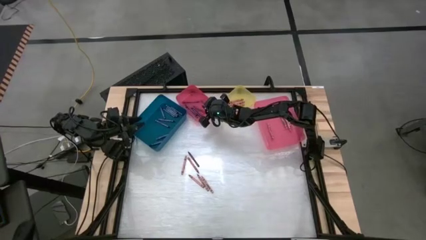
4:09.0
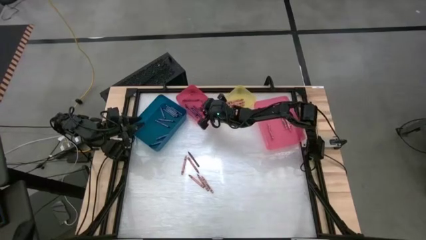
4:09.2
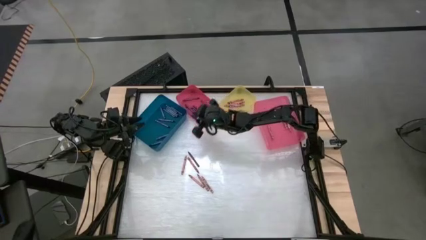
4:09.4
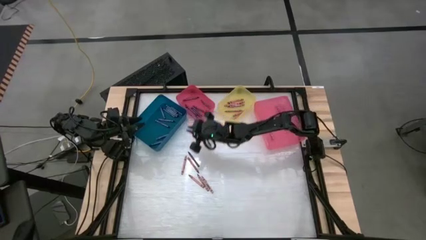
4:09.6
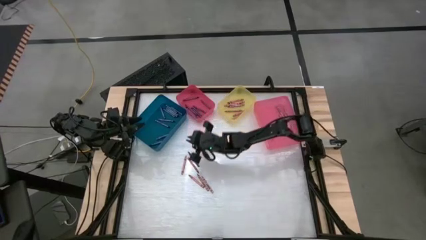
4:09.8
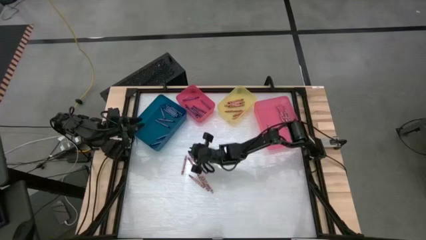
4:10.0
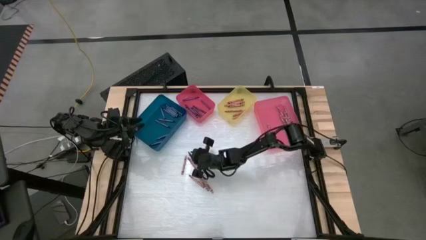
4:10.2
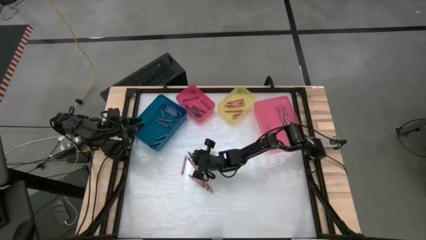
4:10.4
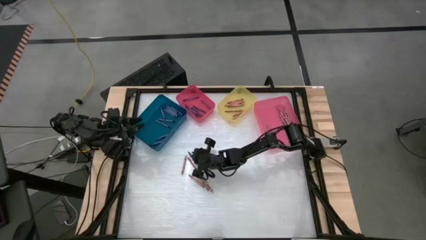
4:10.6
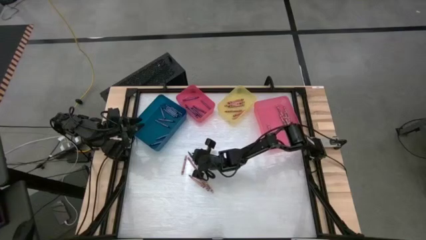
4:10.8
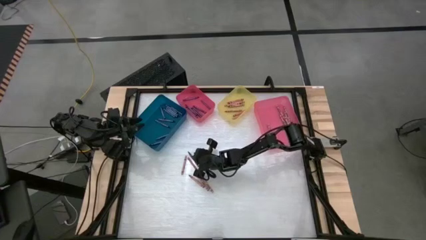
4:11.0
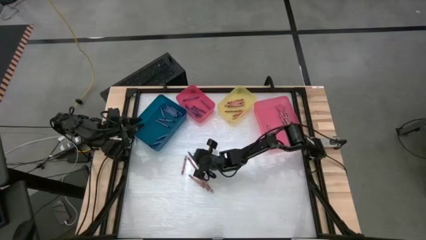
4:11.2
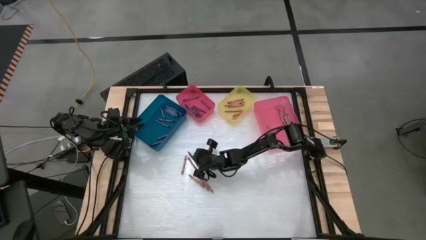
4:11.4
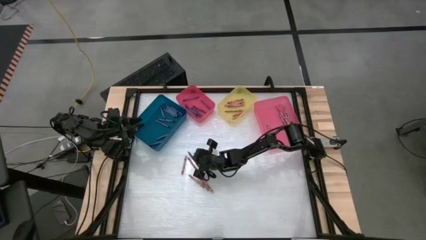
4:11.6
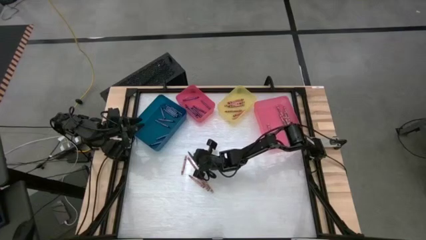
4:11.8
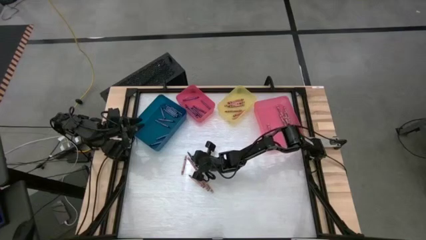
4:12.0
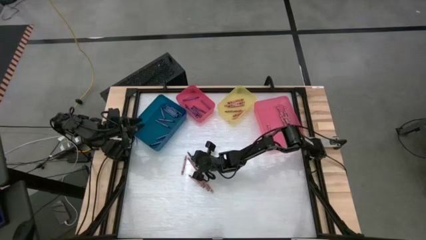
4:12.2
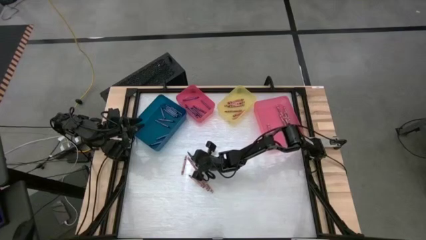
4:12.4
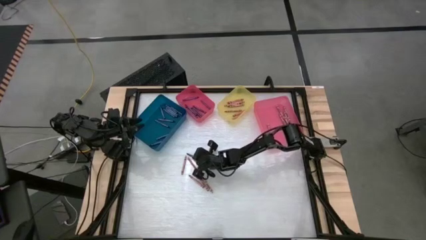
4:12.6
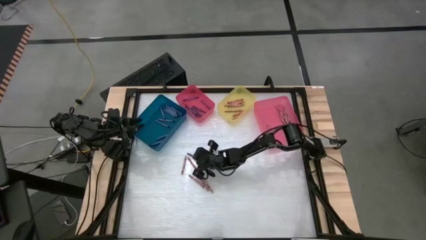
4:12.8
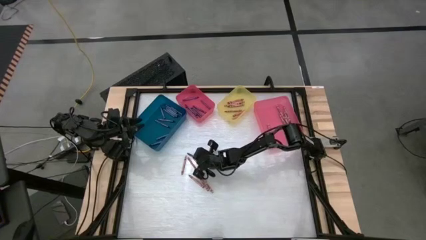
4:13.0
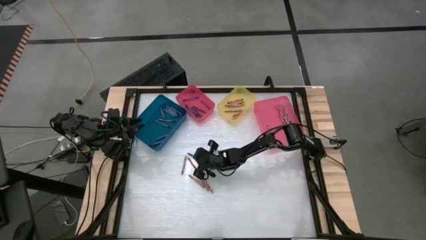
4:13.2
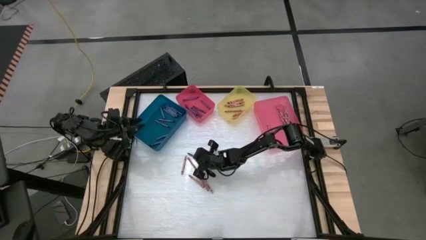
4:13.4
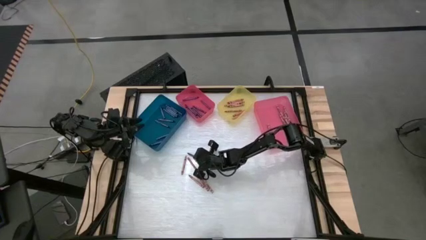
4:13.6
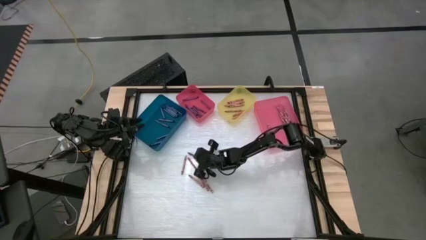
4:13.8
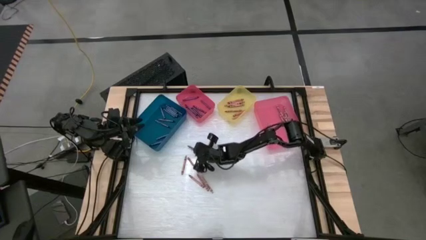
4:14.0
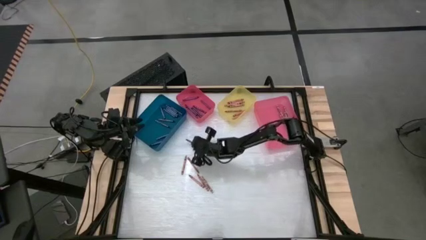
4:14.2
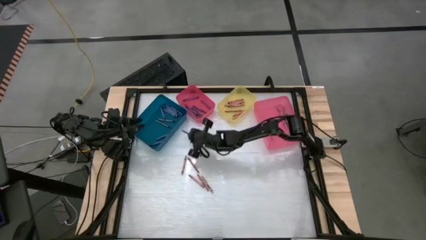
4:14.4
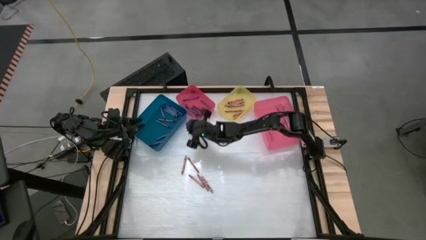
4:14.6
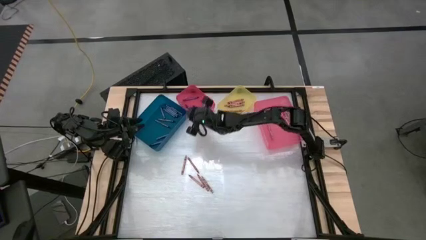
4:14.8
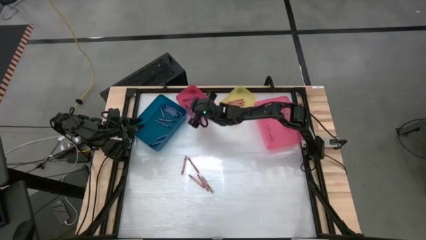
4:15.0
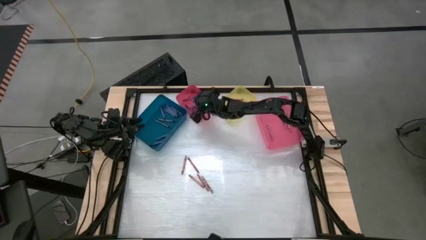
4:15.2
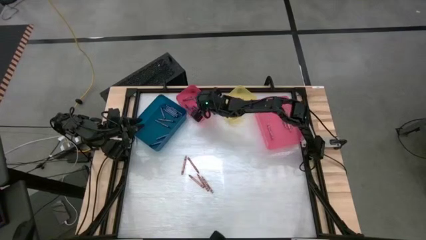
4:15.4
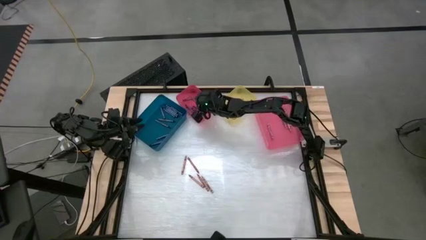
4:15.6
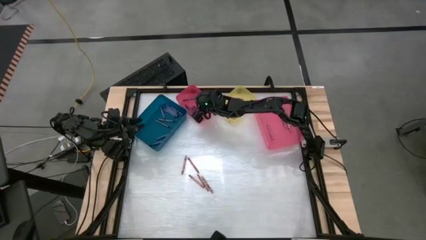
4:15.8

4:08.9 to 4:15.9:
Task: Sort crayons
Put the violet crayon into the left pink bin

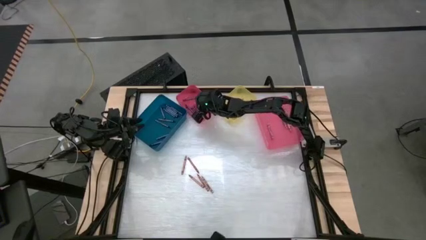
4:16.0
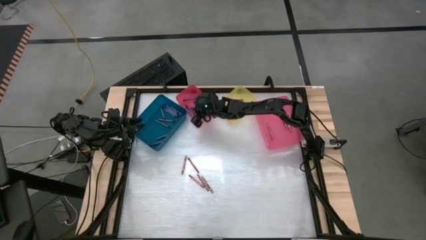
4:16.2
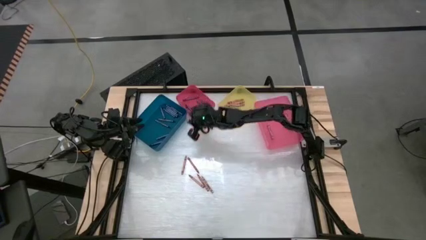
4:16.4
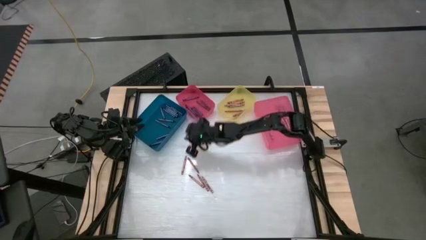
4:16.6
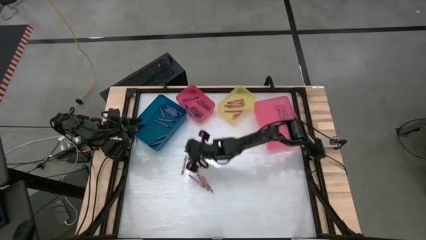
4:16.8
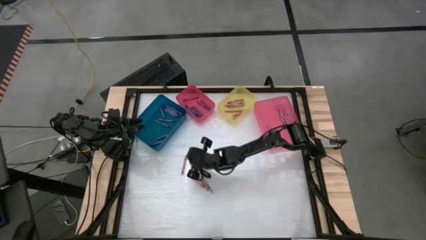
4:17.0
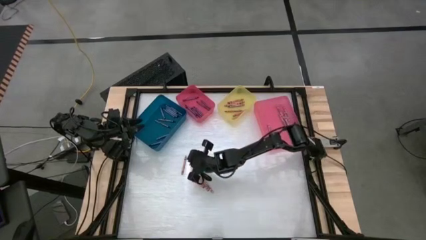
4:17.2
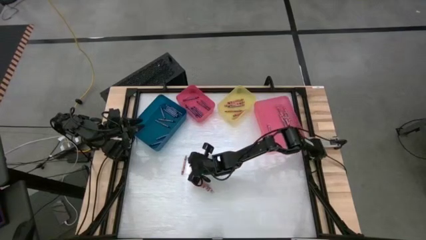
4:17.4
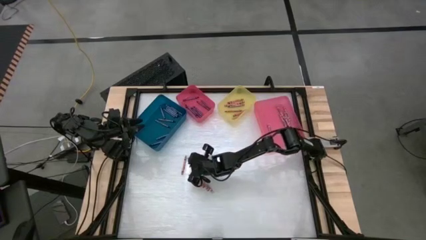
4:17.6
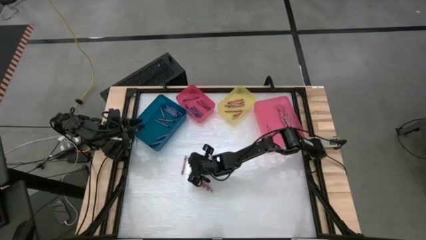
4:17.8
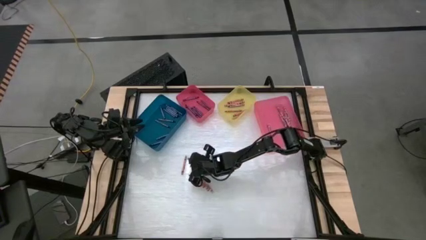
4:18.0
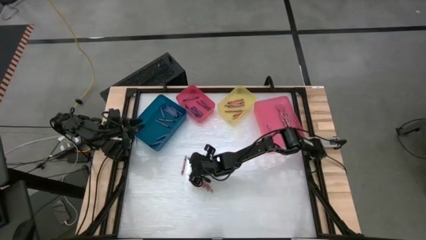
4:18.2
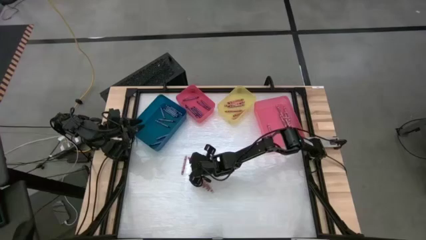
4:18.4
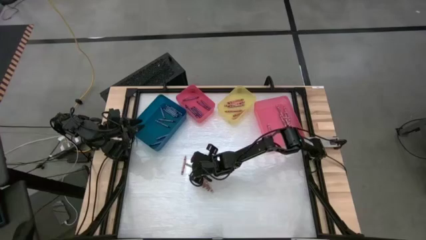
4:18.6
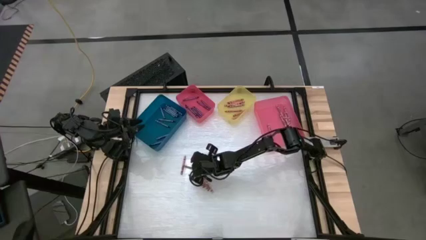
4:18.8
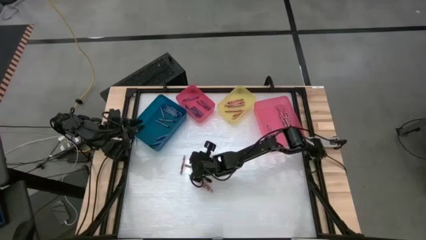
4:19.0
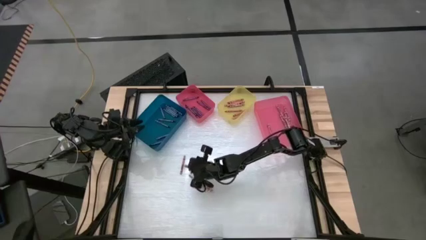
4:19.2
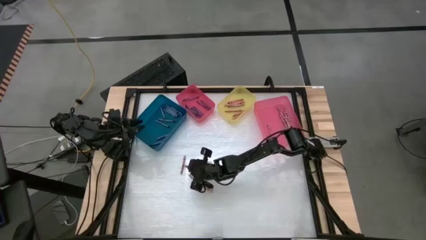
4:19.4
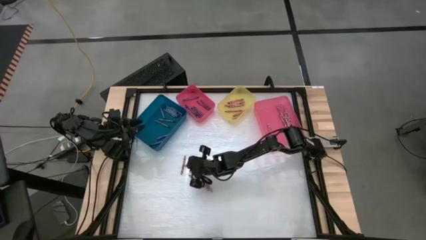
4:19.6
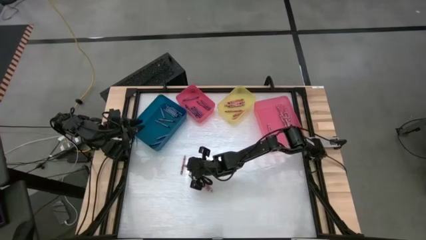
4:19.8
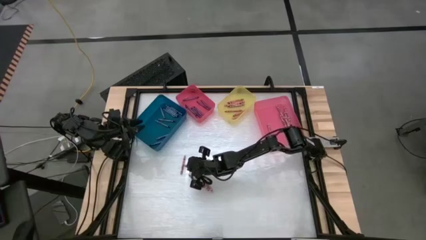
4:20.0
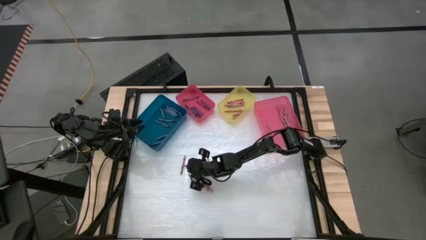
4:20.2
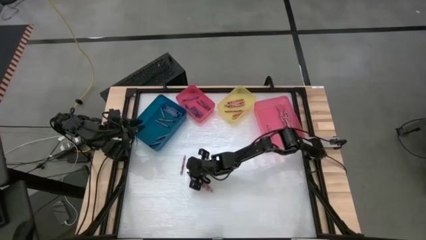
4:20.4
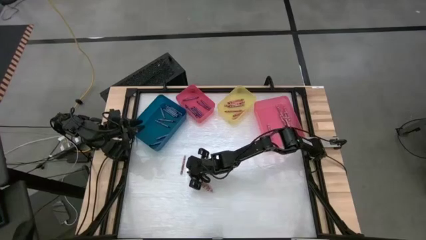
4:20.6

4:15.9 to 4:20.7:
Put the red crayon into the yellow bin

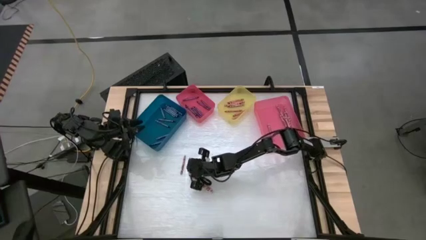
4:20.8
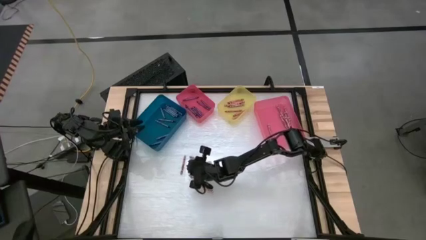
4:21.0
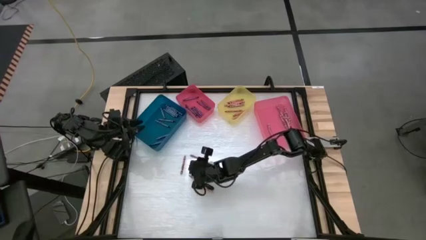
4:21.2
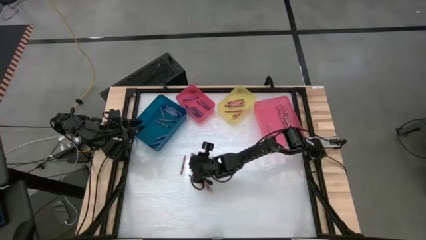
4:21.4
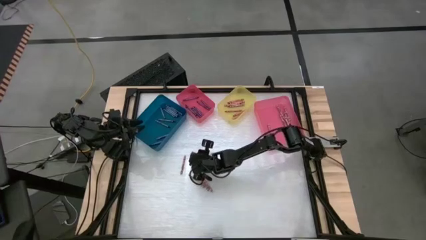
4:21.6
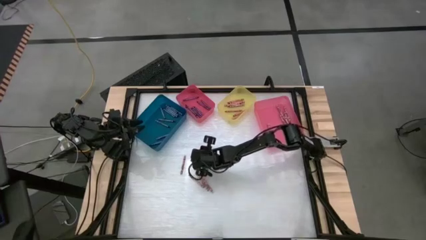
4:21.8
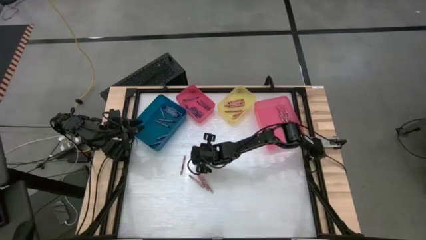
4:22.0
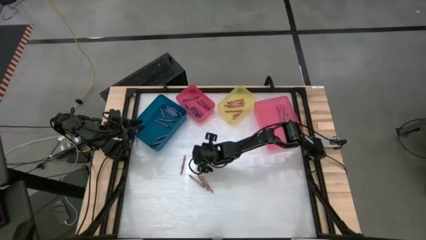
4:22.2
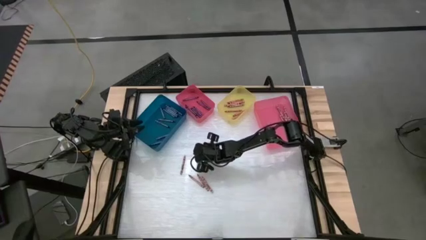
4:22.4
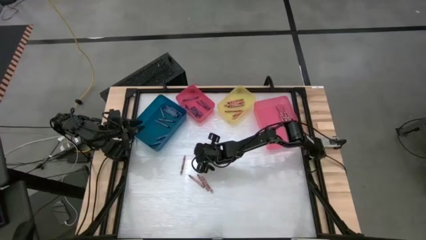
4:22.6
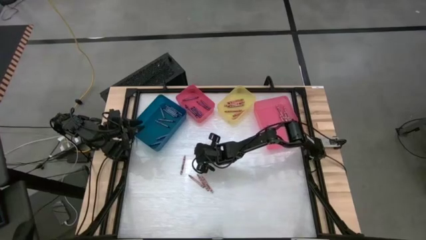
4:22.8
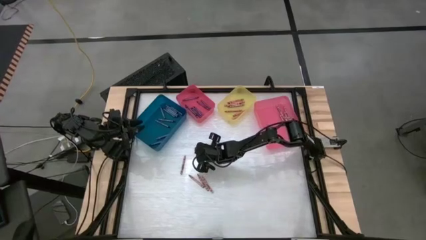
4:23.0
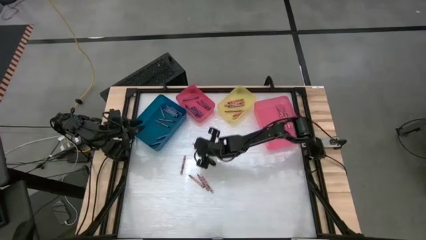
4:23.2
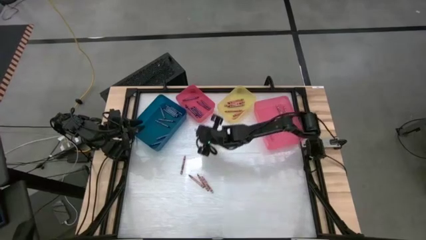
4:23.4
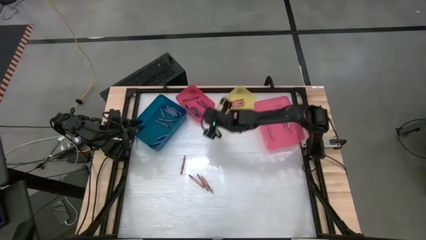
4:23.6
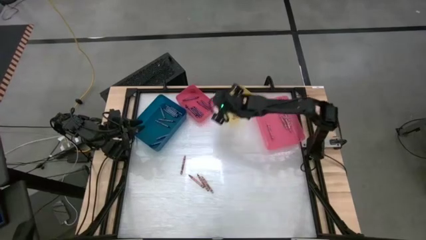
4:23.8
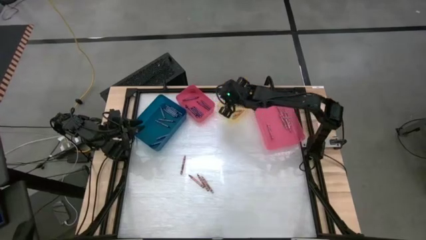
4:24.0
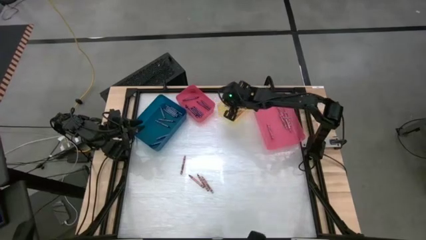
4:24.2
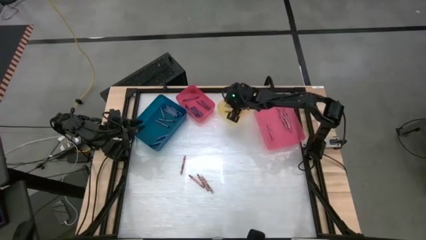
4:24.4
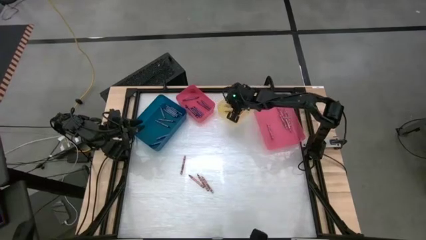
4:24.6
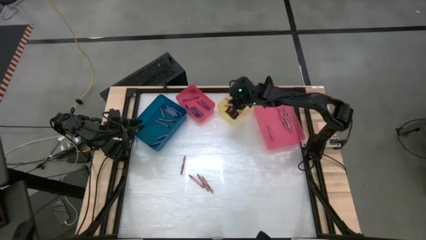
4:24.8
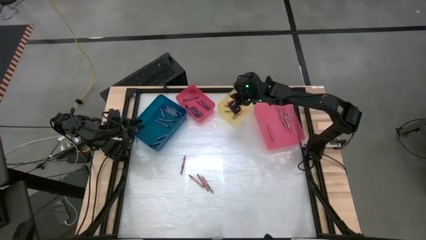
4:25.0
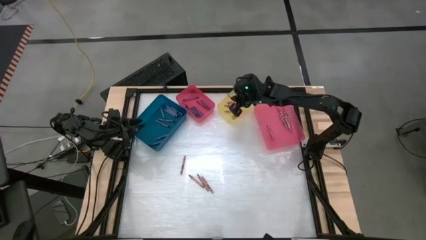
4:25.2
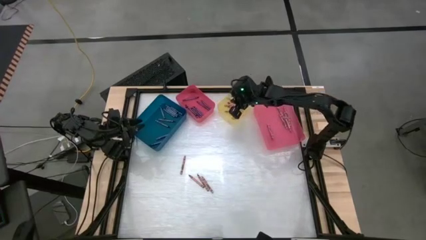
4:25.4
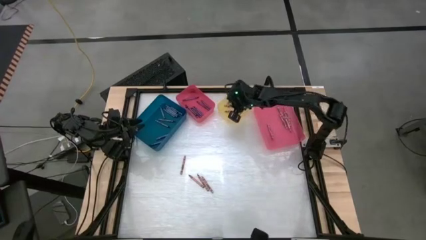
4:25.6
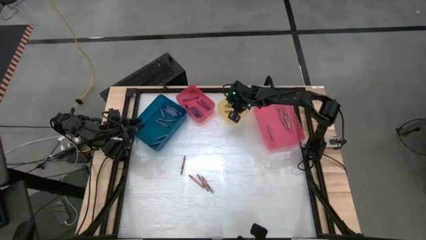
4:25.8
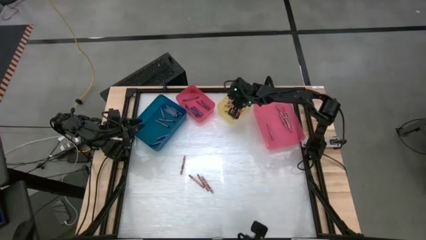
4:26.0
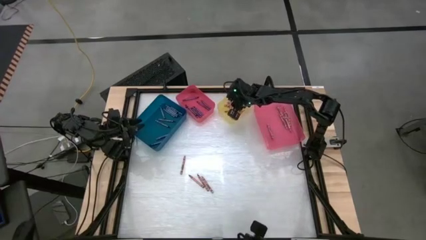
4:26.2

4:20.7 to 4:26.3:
Put the red crayon into the yellow bin
